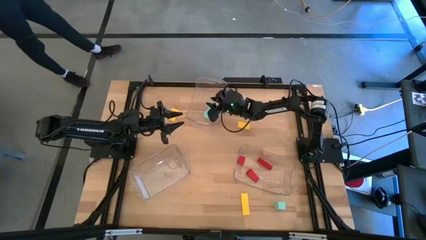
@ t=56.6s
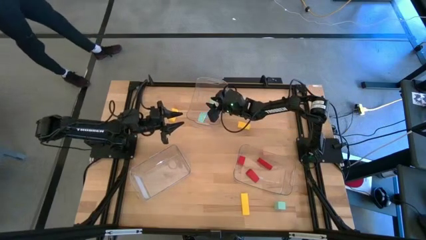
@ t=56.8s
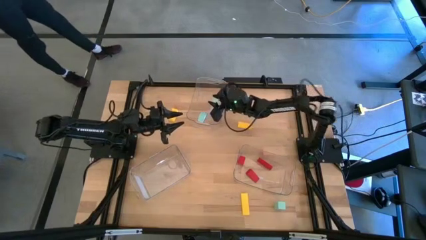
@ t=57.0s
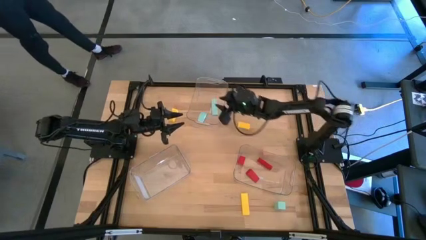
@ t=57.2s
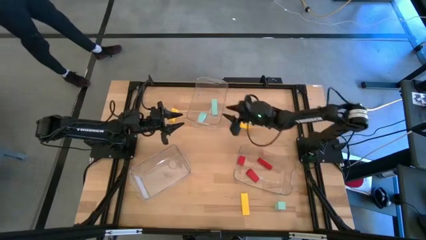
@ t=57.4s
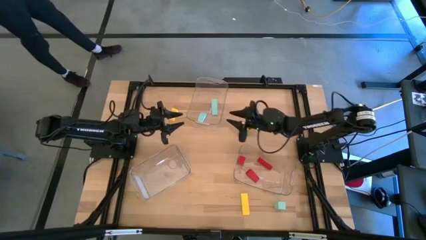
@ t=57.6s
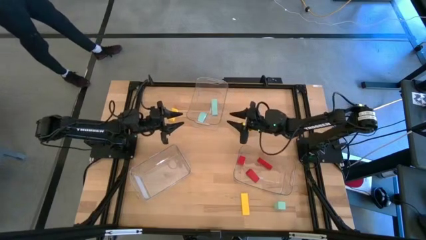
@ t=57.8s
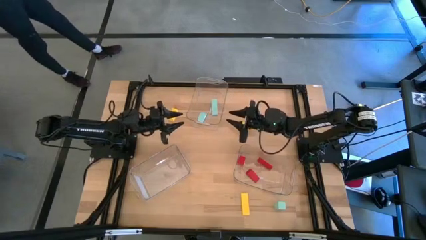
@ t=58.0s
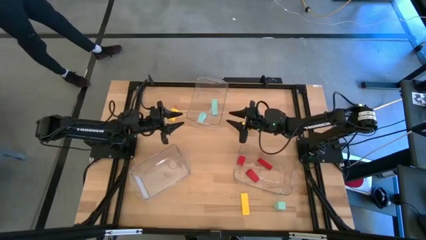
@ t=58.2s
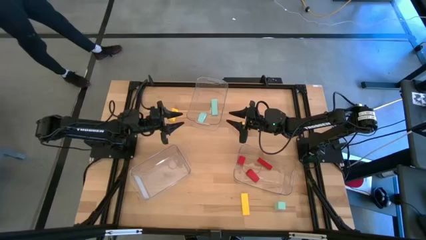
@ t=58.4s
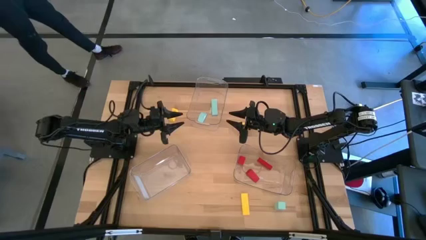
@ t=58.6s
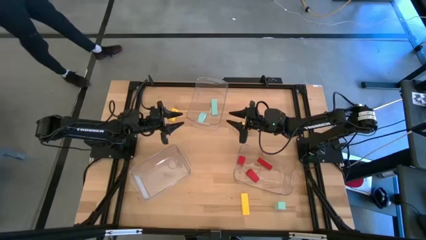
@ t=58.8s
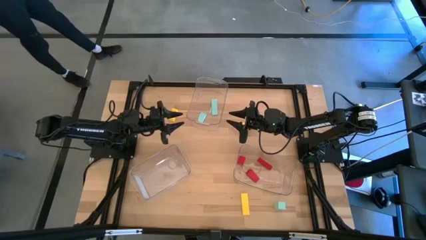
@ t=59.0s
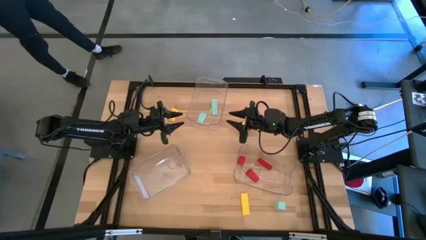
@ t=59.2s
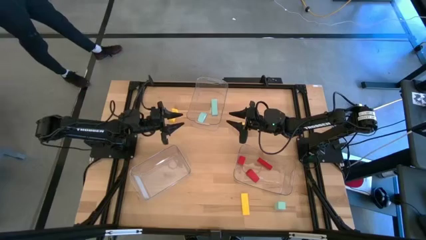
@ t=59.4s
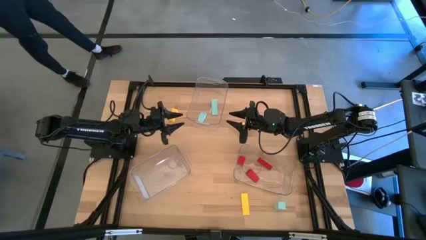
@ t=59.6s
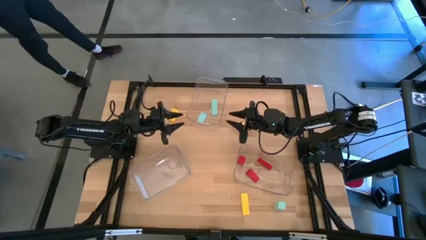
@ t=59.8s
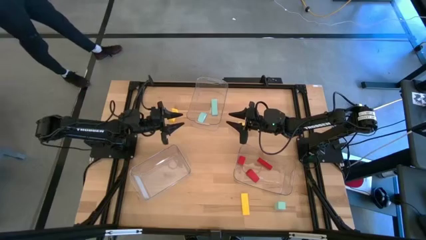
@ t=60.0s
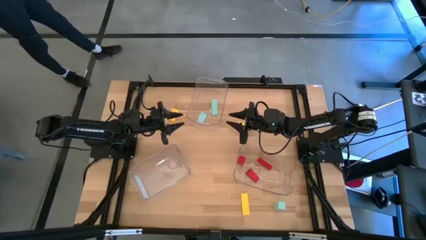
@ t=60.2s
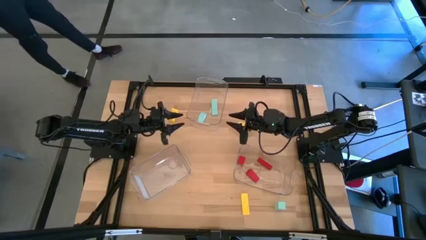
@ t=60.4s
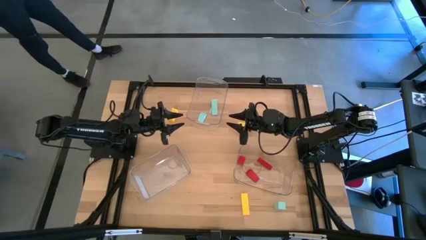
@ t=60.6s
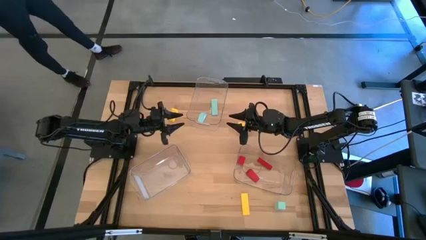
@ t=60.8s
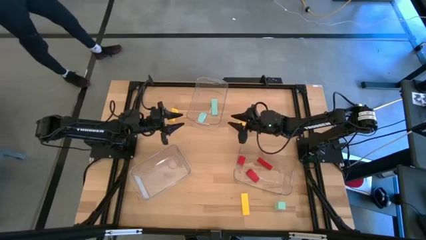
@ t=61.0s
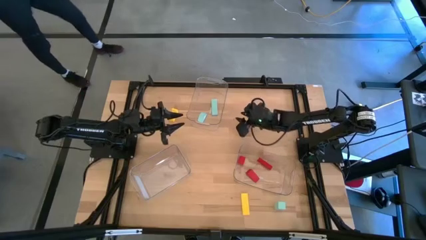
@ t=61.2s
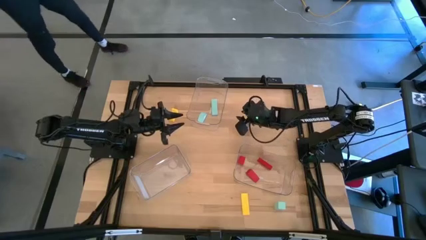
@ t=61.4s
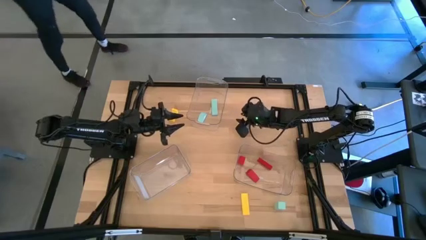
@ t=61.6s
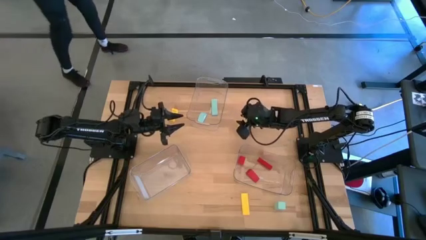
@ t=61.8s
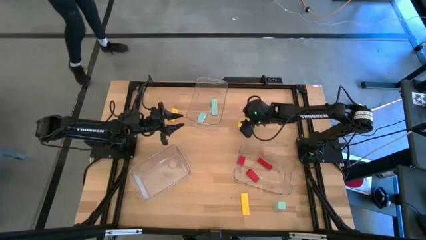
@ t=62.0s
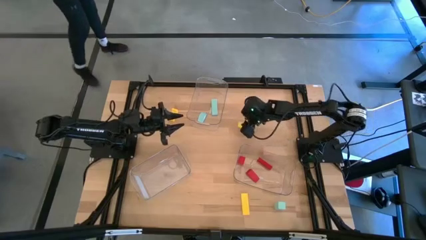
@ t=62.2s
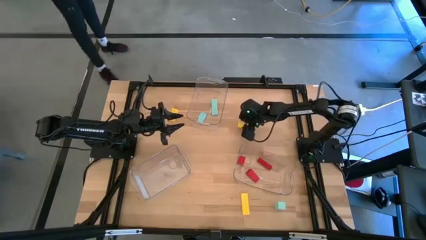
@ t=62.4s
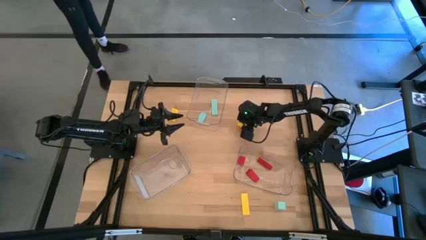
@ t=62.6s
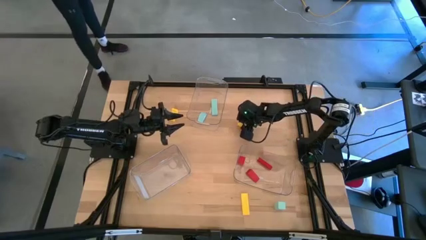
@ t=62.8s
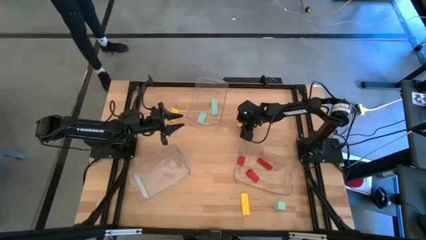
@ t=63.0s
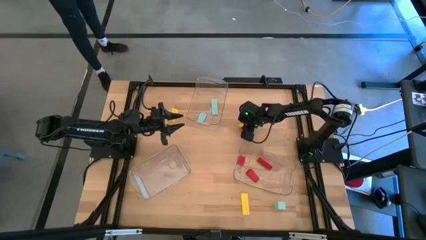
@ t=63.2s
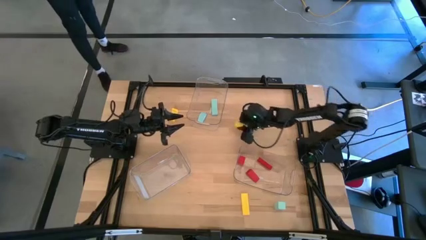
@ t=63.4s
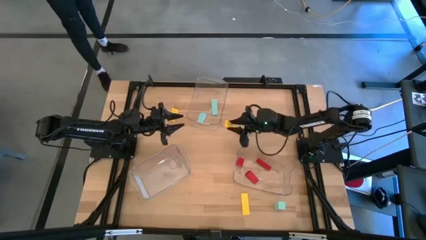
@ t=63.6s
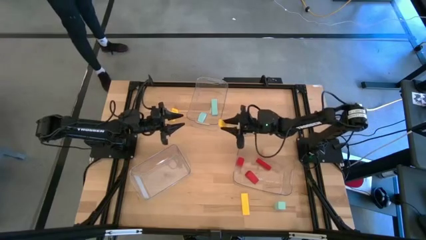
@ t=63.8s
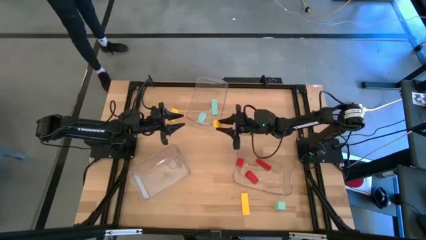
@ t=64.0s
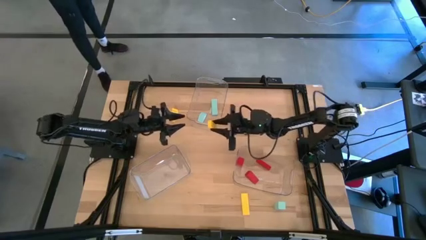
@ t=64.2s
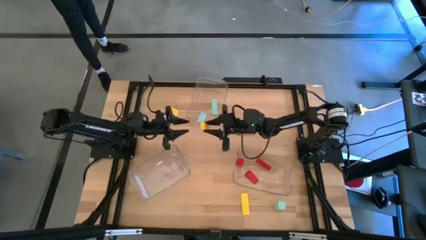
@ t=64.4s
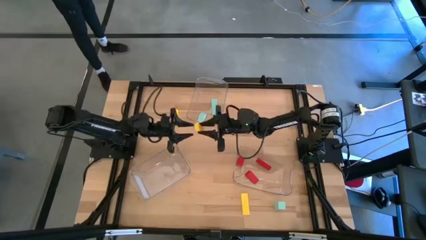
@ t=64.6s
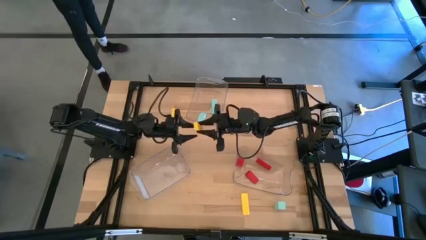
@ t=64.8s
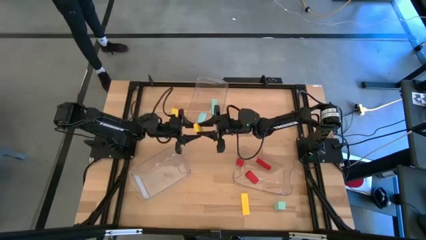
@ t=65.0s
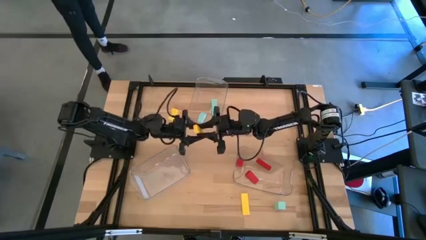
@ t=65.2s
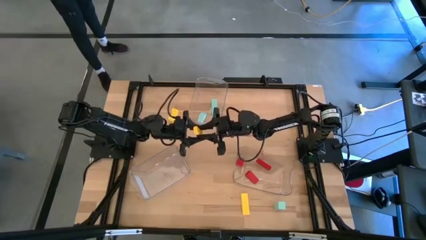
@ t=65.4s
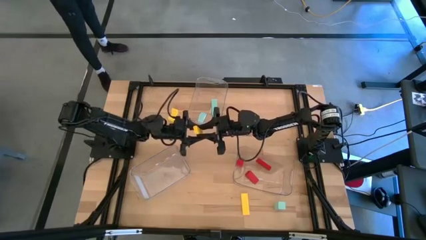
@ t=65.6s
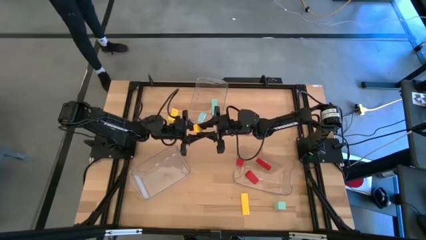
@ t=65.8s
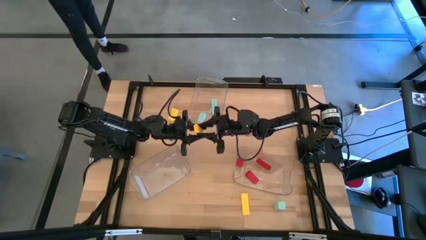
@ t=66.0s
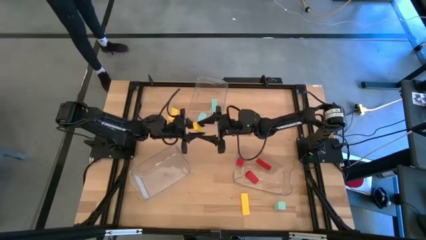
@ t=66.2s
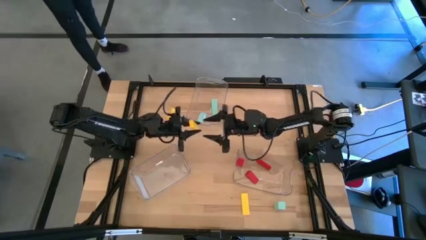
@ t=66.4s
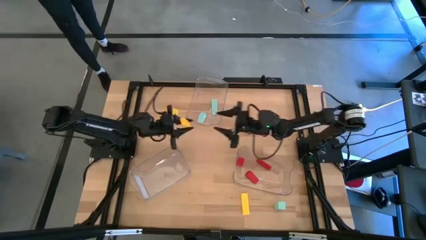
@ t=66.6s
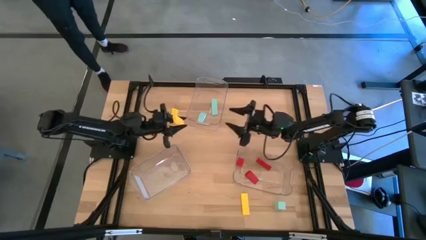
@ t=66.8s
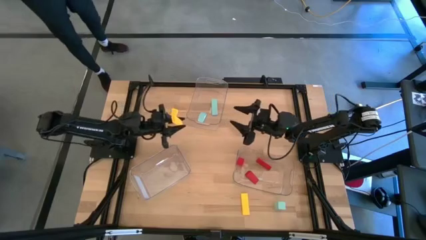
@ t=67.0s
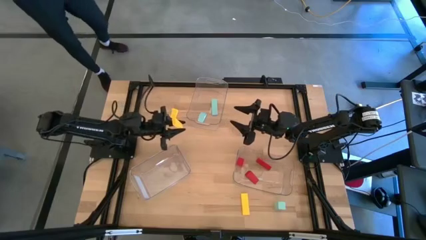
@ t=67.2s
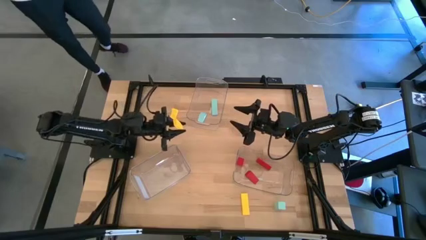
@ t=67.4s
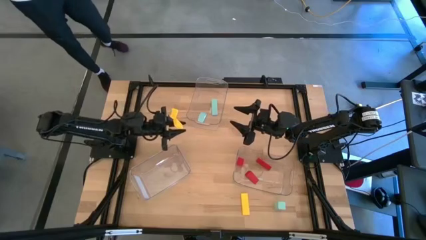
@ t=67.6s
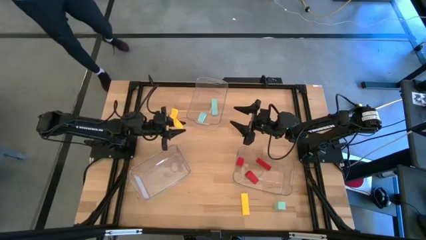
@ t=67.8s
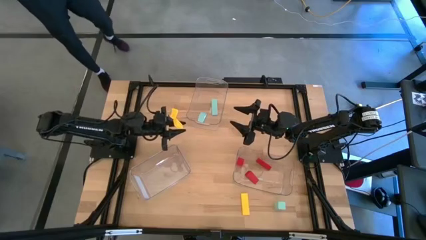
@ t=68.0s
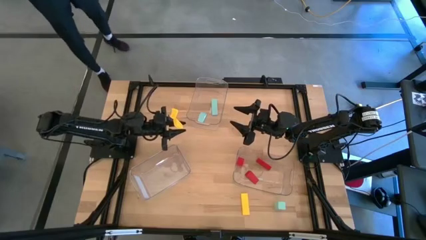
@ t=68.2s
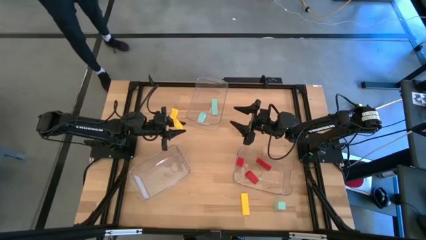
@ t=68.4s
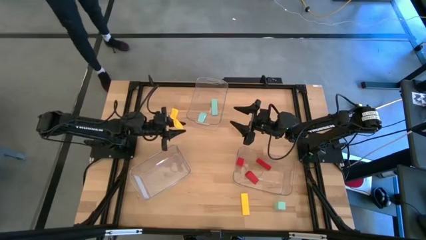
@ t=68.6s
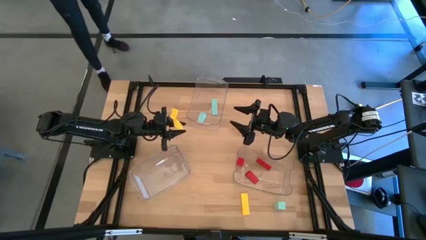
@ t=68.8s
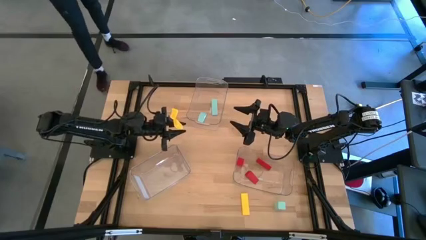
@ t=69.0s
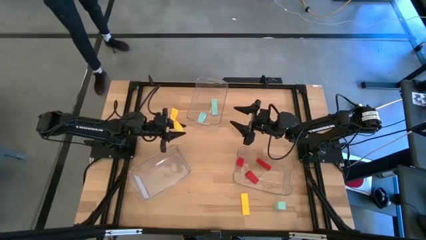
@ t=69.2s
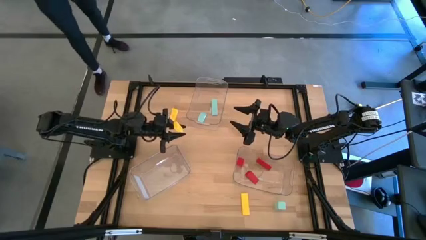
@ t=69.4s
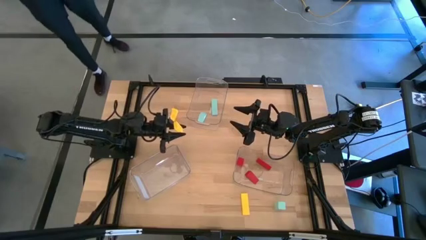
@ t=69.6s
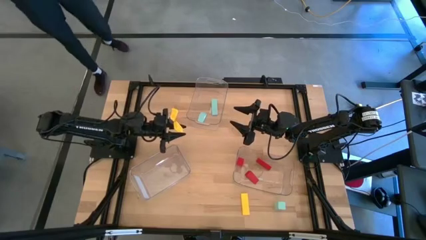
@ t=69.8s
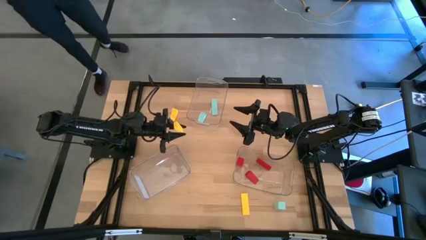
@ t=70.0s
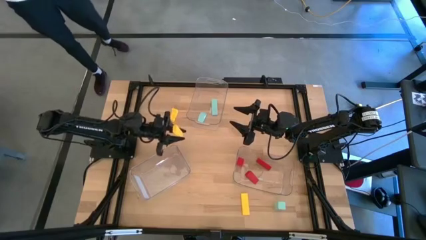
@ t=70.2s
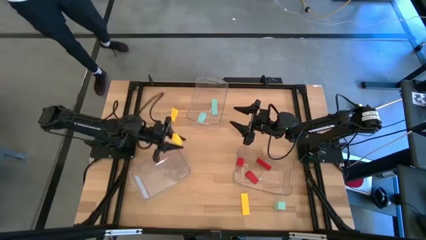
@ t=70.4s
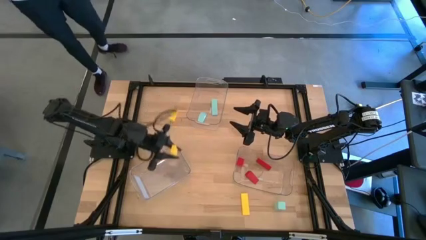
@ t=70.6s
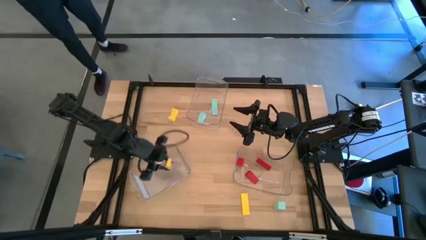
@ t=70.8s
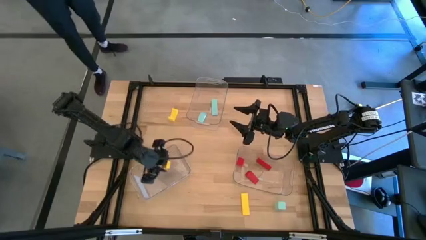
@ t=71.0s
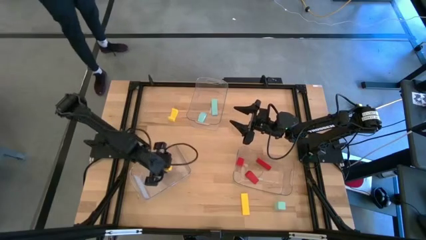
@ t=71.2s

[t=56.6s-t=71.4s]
Task: Sort & place blocks by color
Put the top right yellow block into the bottom left transparent bin
